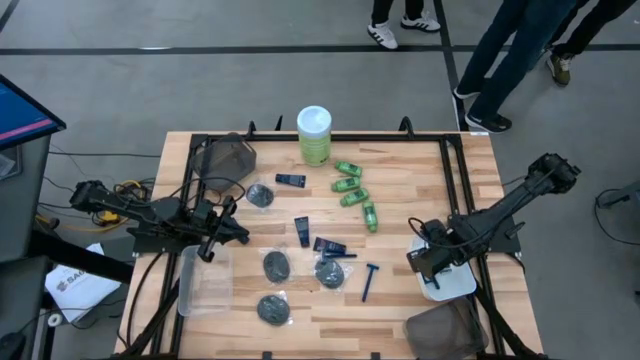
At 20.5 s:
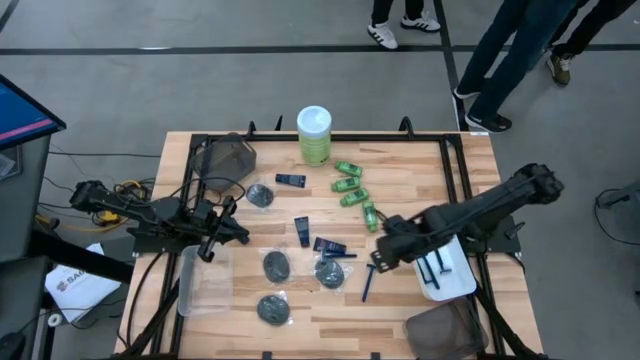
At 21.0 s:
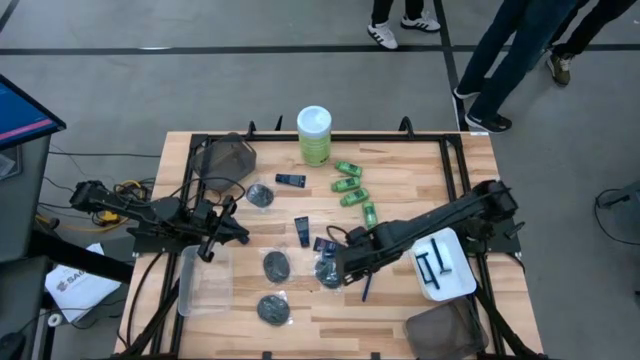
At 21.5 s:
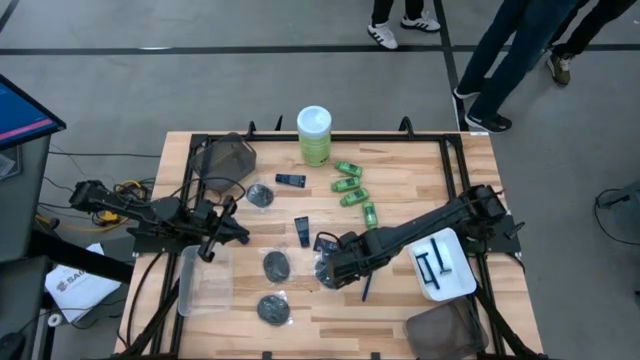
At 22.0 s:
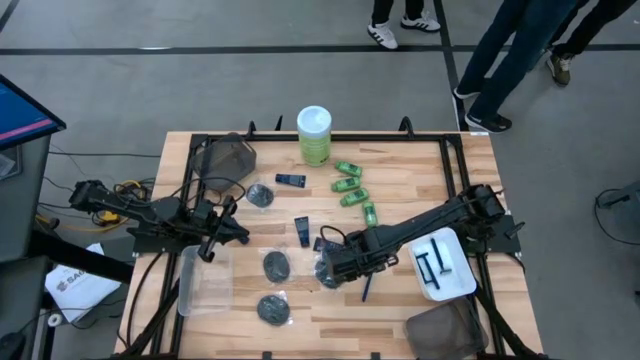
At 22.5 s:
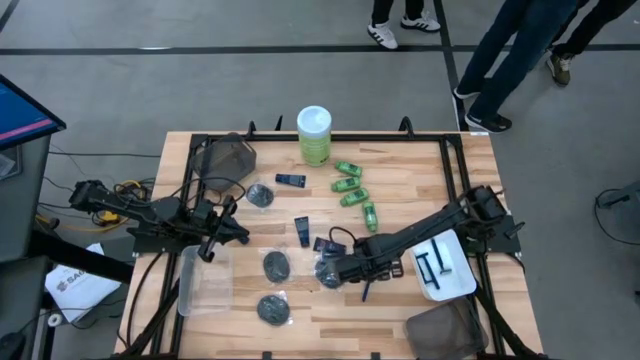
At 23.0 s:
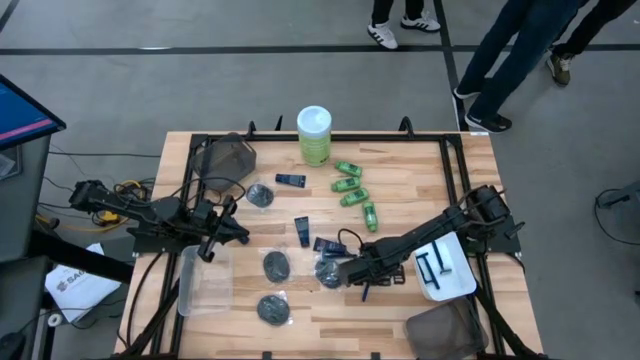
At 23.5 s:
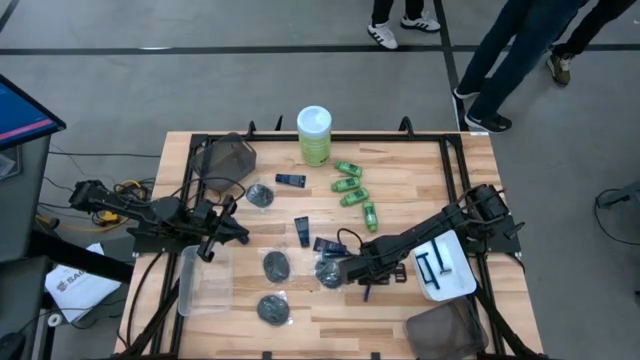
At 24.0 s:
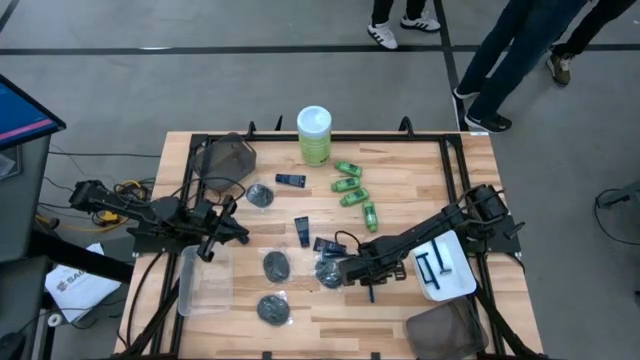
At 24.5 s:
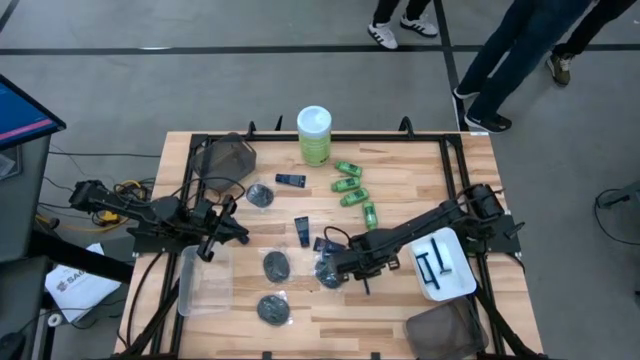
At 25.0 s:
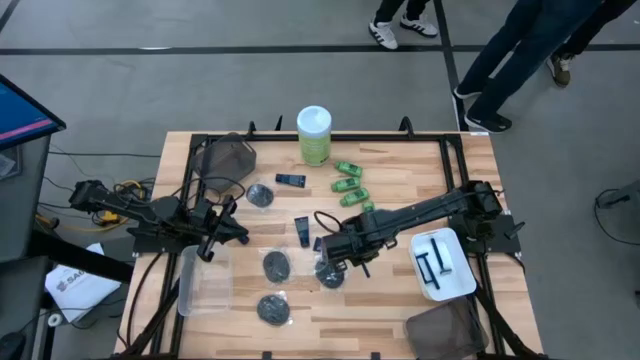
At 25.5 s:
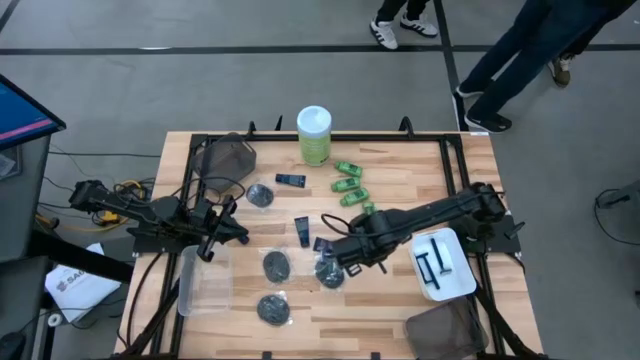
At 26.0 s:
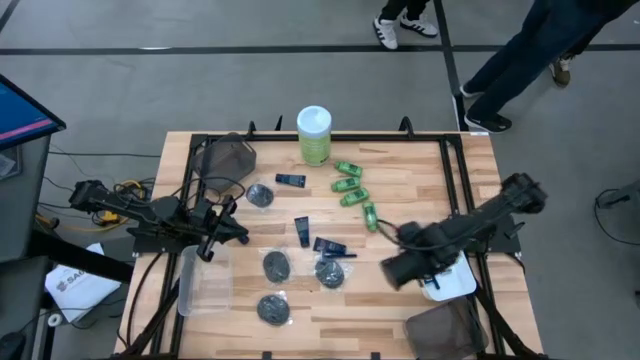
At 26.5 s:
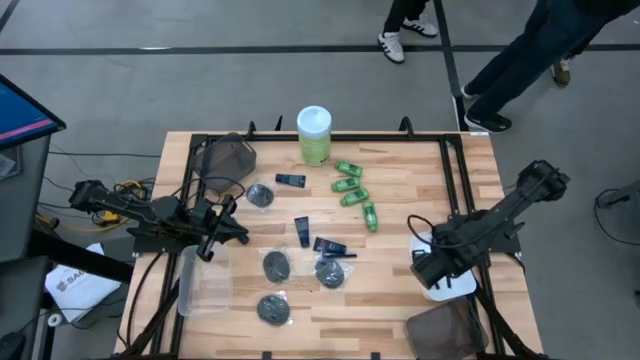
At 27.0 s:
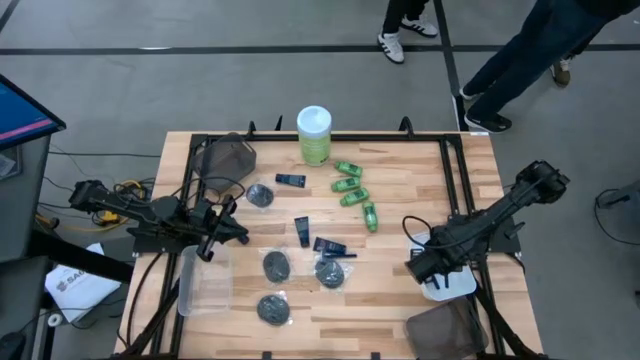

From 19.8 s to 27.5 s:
Task: Pick & Place Travel size toiletries
Put the blue razor into the white bin

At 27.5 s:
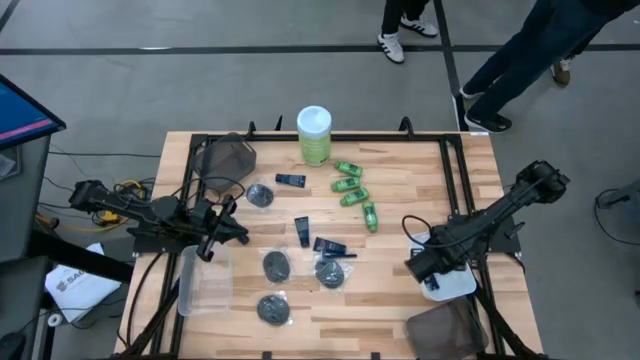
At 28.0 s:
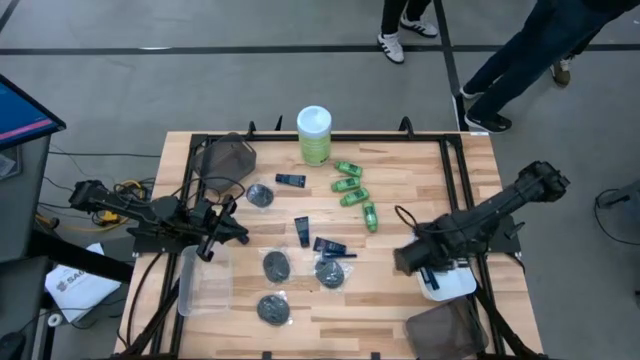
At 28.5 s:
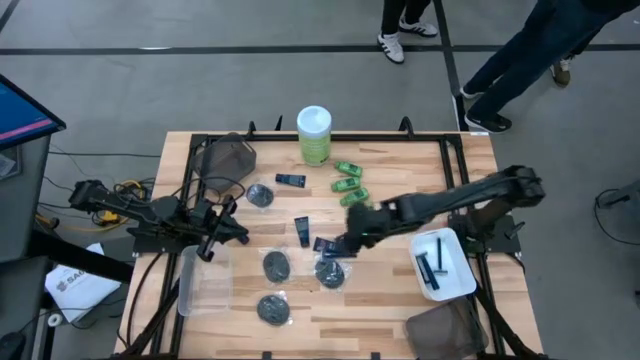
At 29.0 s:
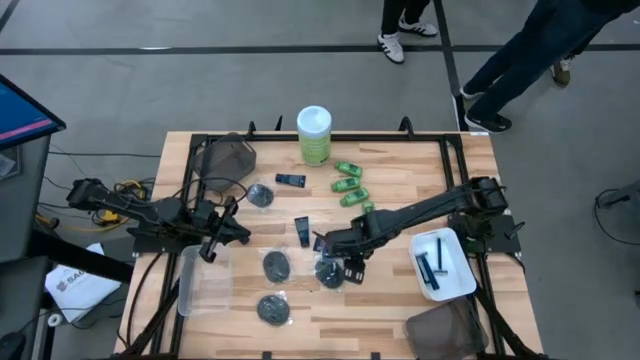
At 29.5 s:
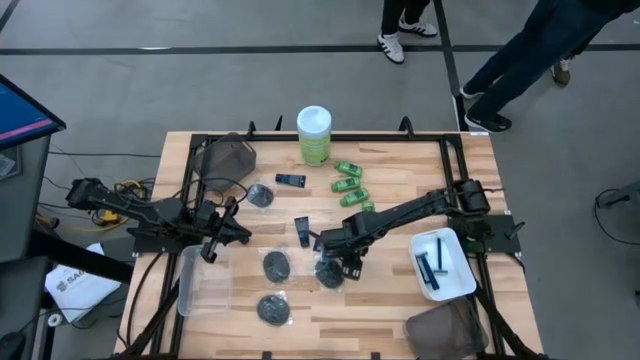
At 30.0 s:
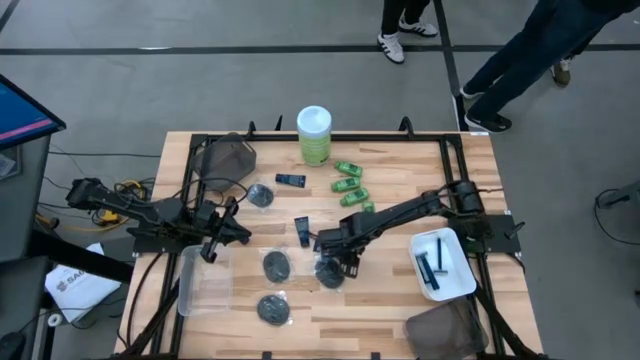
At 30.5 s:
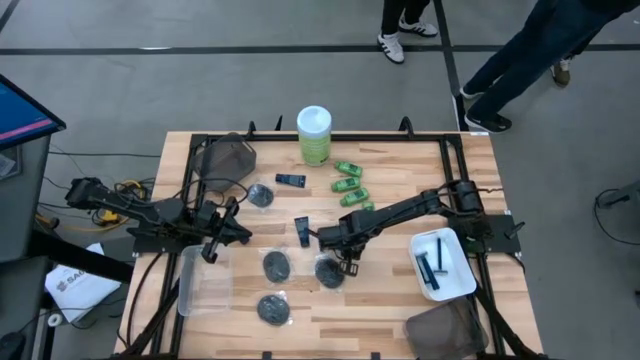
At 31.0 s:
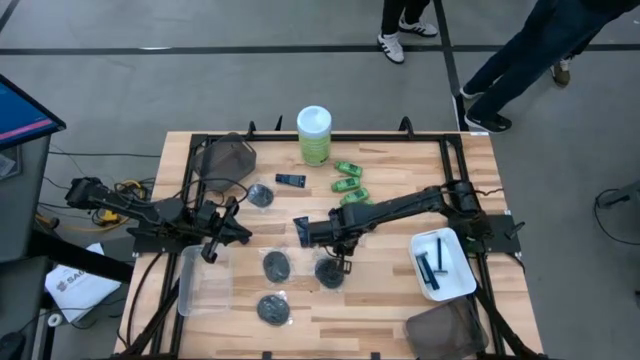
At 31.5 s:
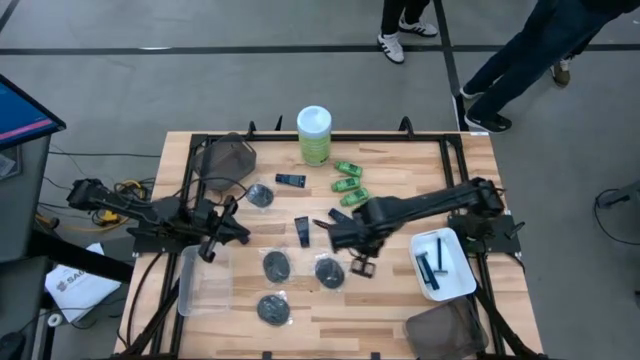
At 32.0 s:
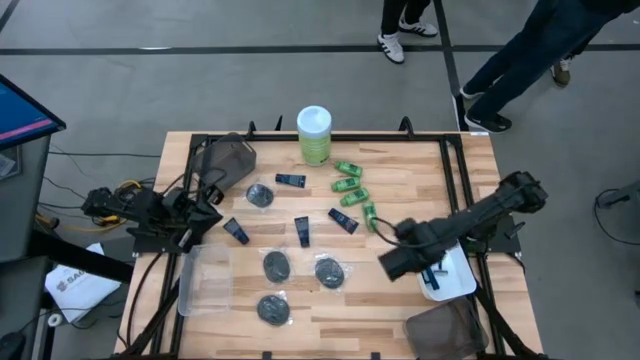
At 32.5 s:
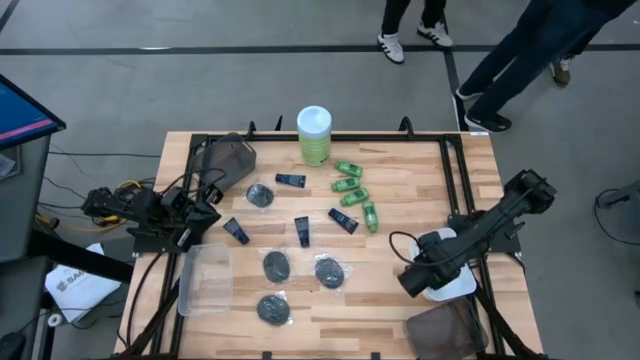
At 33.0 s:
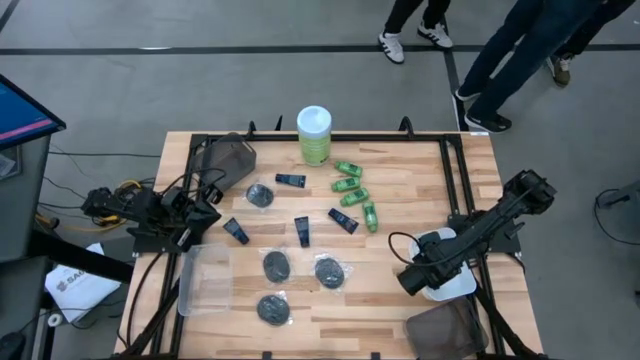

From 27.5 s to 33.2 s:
Put the blue razor into the white bin

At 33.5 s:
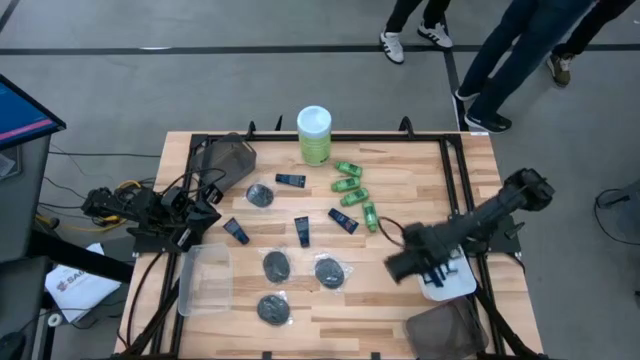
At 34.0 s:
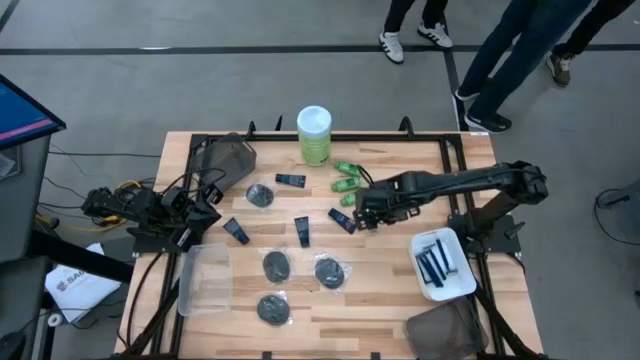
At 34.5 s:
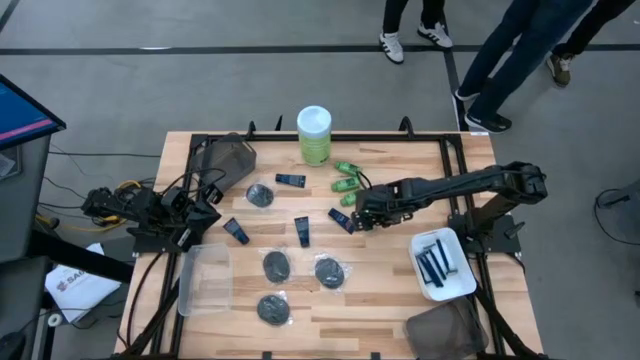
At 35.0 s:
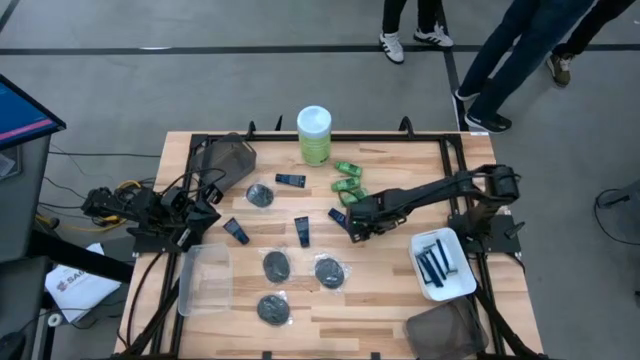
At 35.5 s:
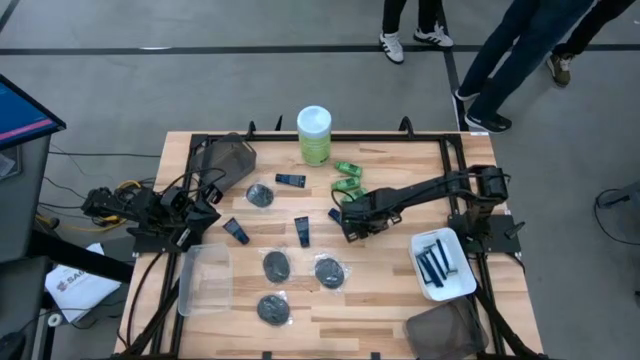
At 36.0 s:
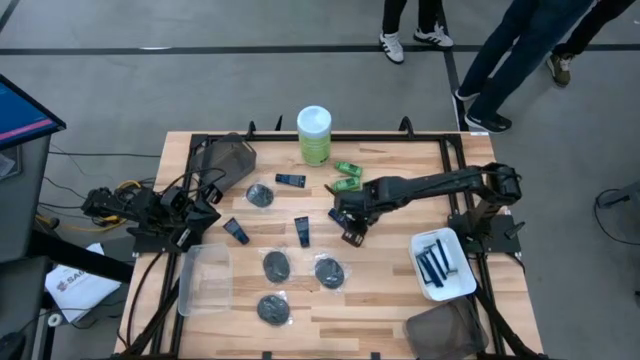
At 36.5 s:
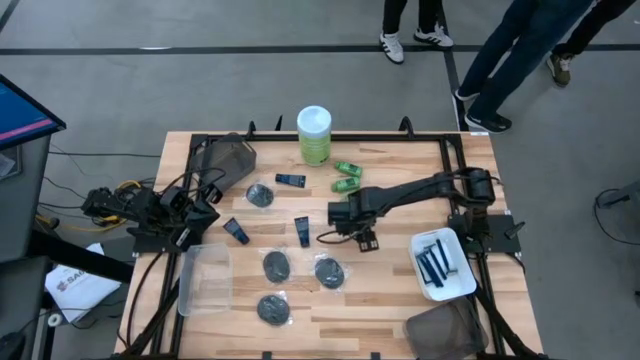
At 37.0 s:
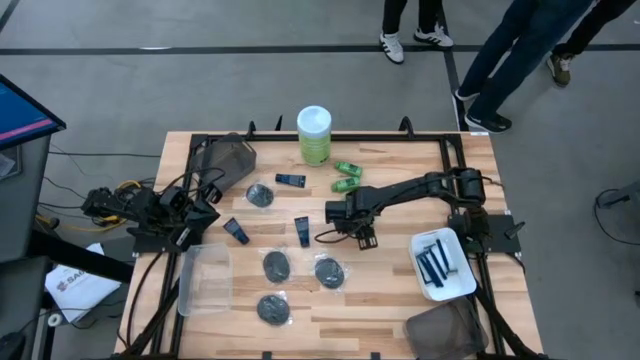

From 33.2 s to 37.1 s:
Put the green shampoo into the bottom black bin

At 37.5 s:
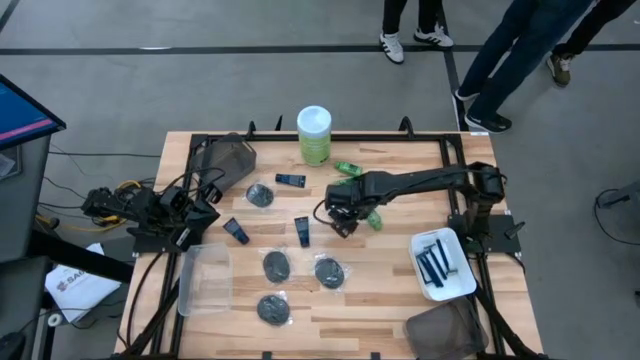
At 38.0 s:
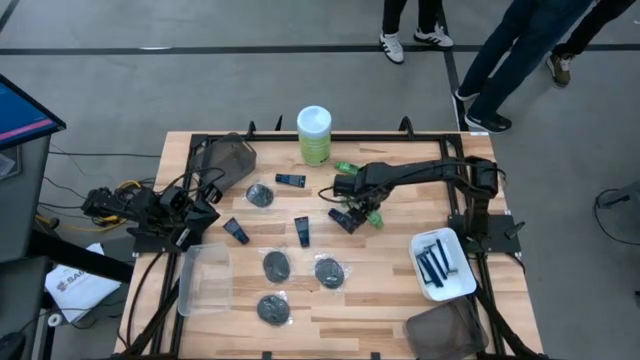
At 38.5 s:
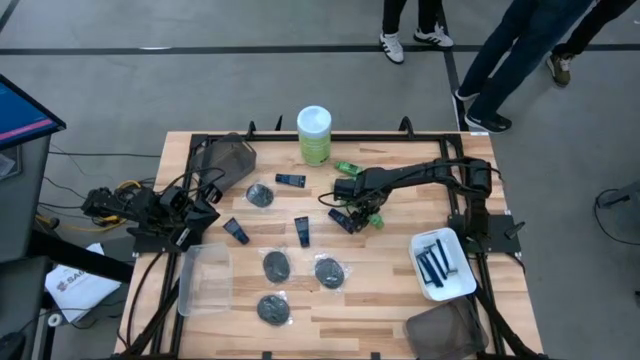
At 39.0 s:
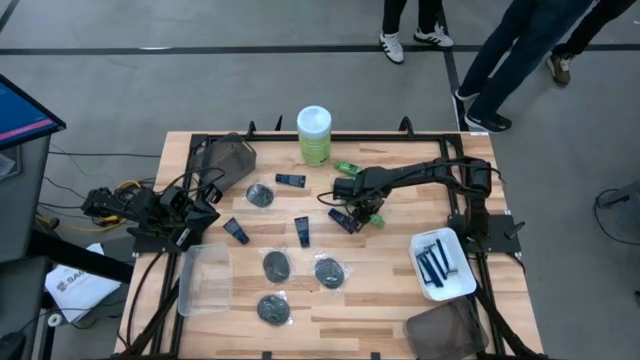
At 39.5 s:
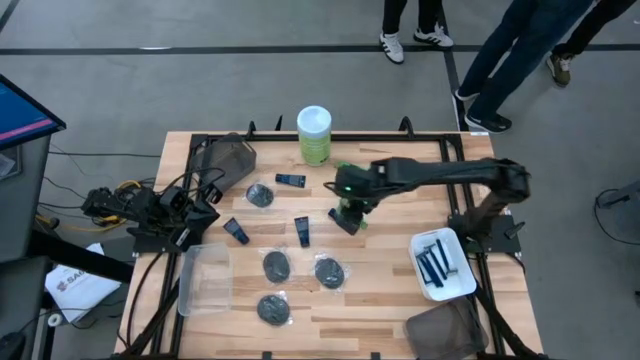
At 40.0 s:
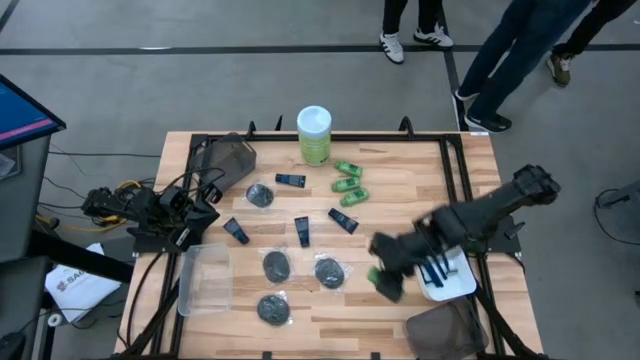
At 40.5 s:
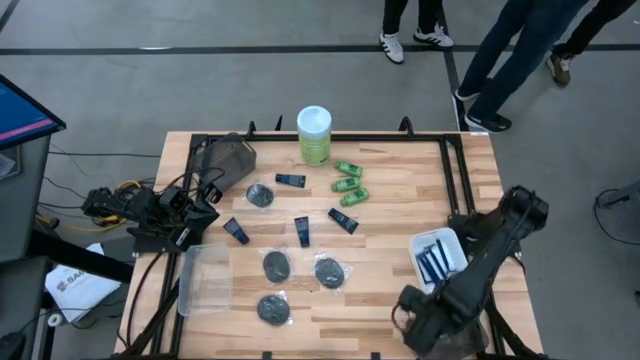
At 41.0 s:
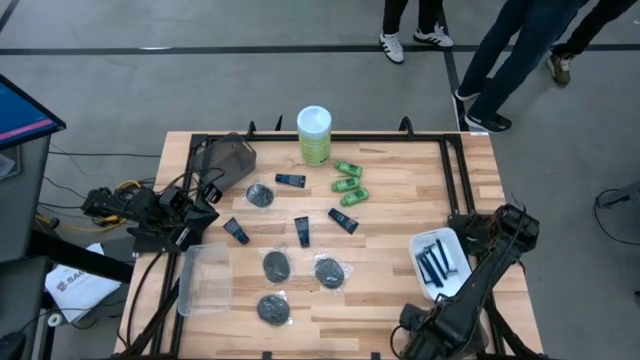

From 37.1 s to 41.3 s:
Put the green shampoo into the bottom black bin

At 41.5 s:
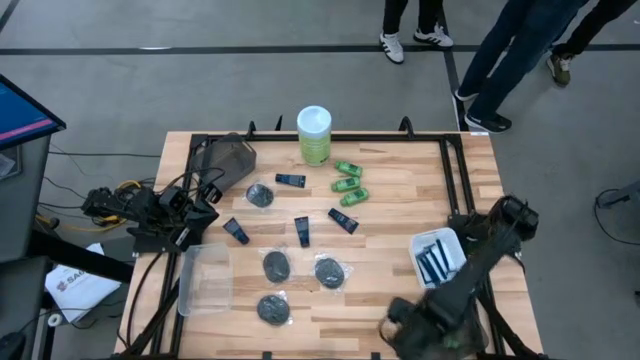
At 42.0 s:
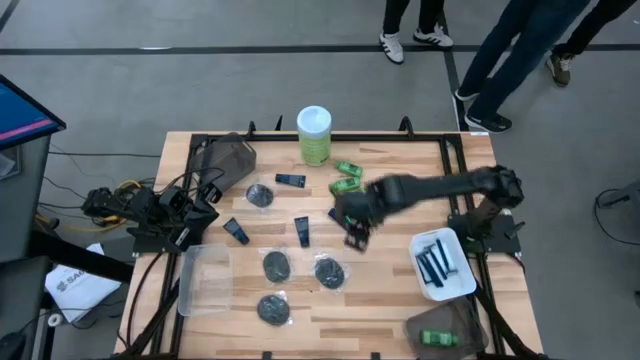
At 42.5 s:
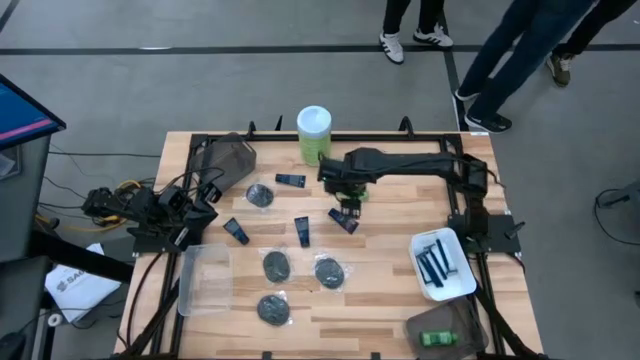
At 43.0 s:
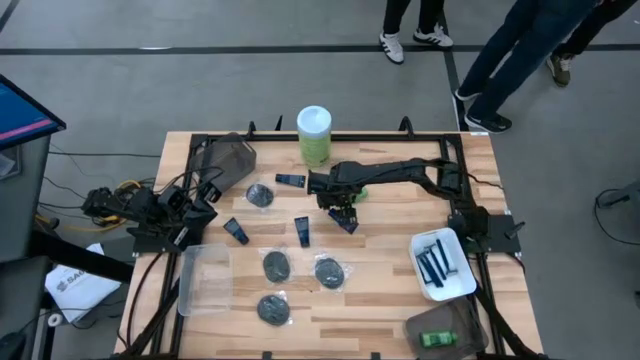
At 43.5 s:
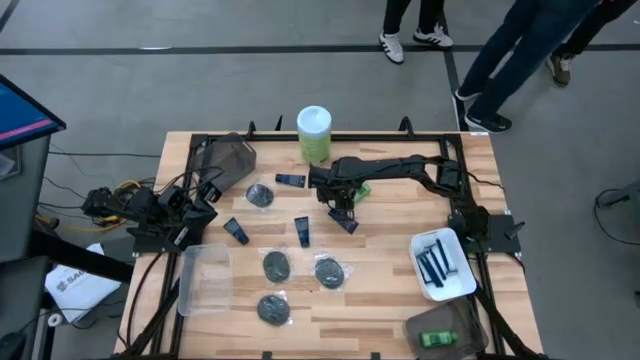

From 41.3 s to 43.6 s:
Put the green shampoo into the bottom black bin
